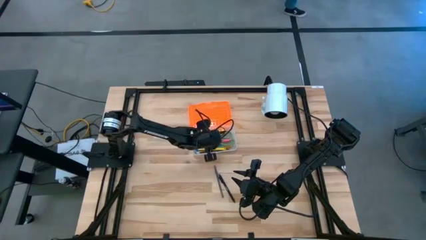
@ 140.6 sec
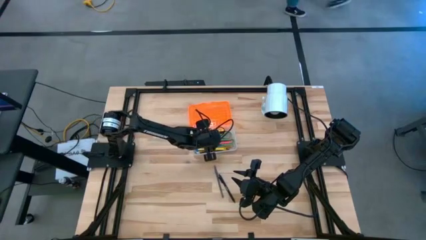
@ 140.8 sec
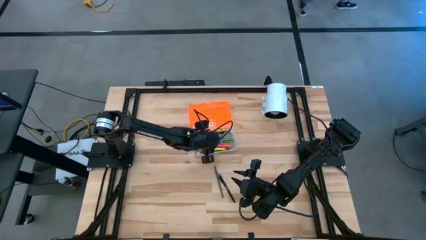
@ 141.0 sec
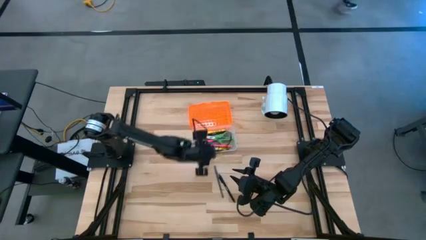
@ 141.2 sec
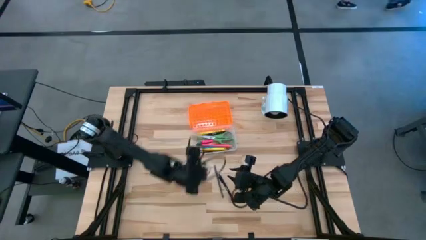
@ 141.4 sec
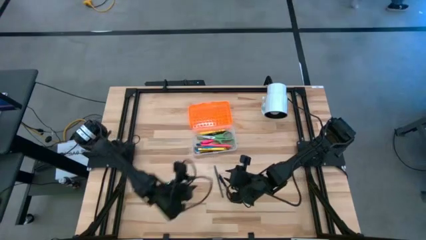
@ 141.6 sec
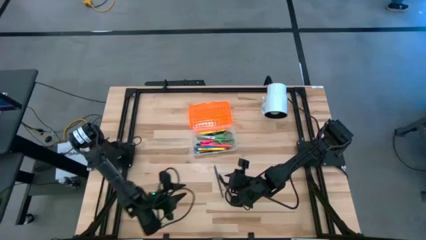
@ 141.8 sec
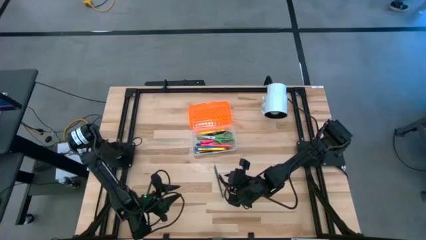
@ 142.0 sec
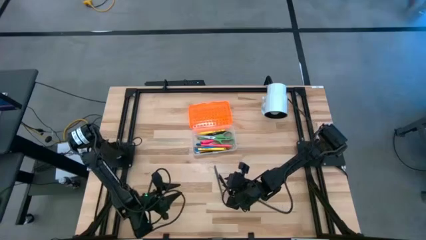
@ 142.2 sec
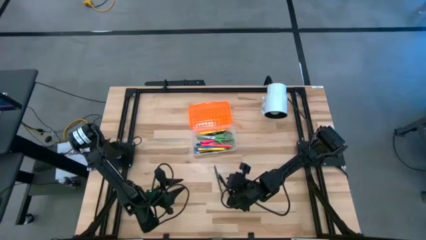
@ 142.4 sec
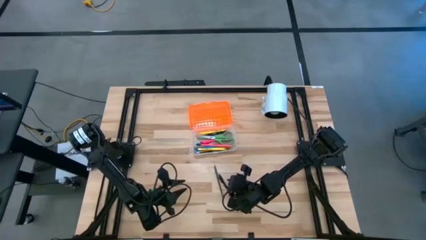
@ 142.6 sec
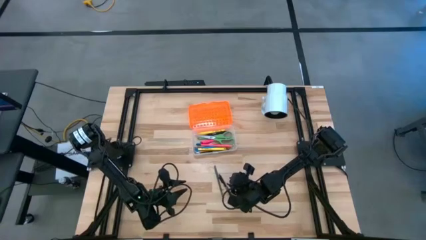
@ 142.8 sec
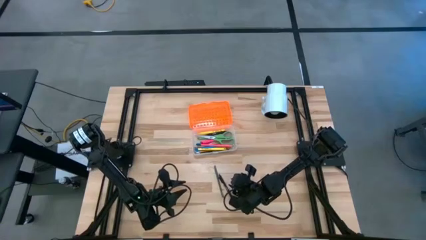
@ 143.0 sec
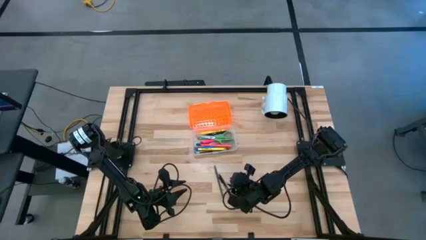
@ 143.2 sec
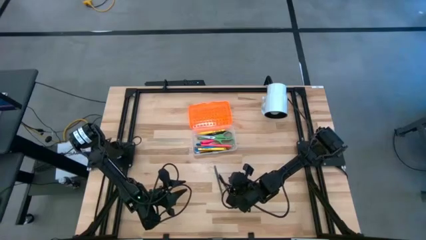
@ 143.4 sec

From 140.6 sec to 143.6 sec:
Task: Pick & place school supplies into a supply box
Put the black pen into the supply box

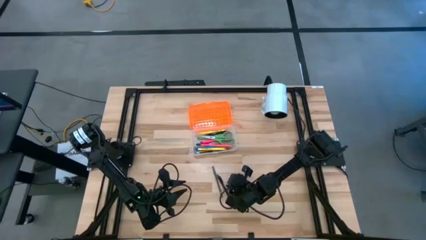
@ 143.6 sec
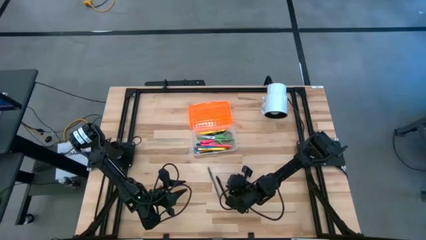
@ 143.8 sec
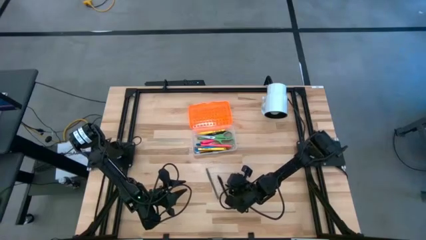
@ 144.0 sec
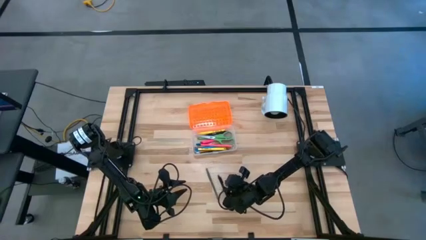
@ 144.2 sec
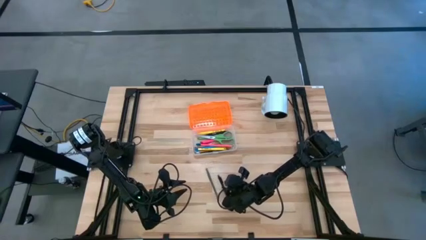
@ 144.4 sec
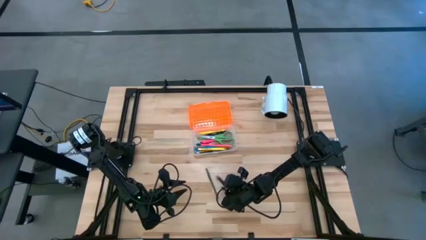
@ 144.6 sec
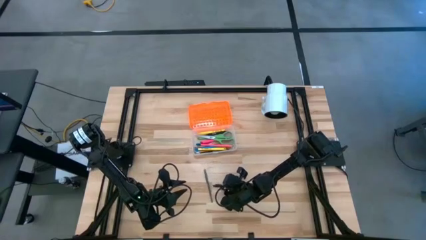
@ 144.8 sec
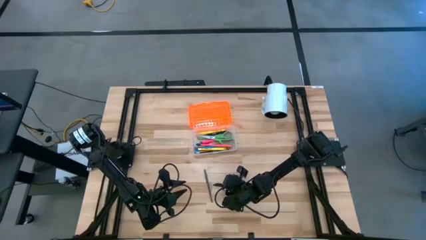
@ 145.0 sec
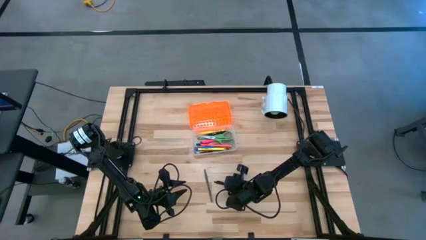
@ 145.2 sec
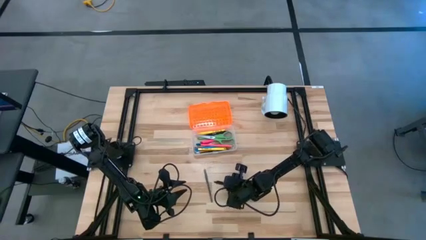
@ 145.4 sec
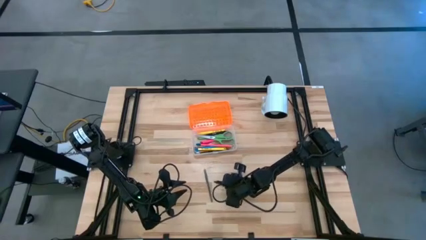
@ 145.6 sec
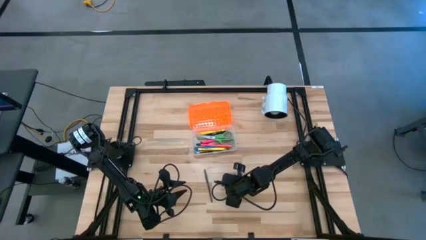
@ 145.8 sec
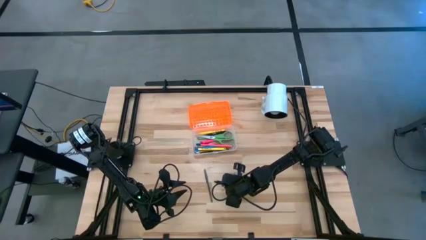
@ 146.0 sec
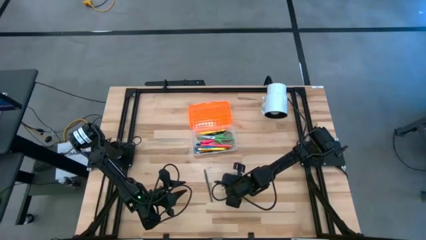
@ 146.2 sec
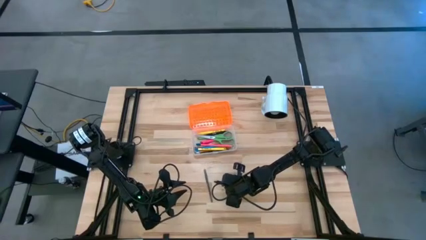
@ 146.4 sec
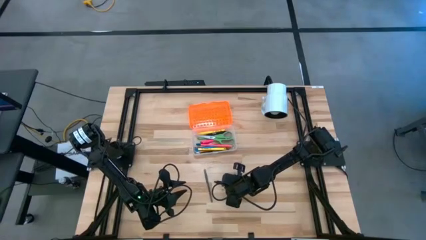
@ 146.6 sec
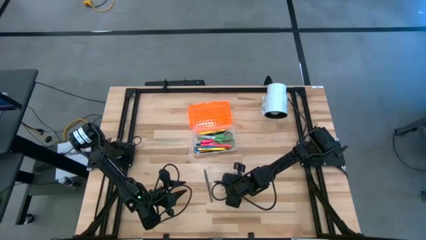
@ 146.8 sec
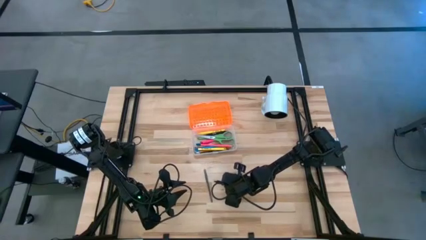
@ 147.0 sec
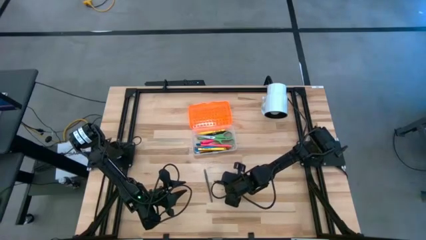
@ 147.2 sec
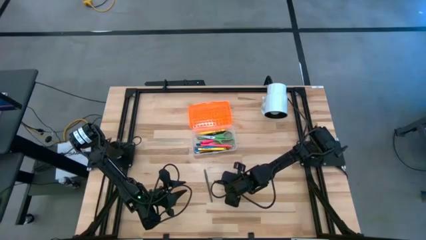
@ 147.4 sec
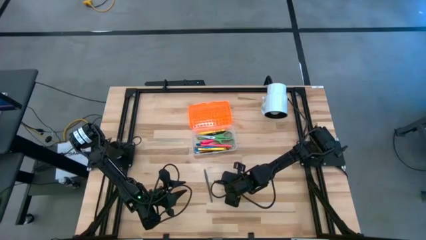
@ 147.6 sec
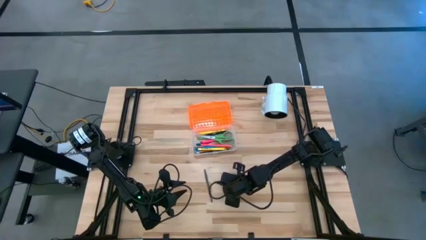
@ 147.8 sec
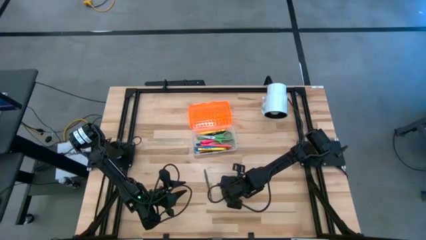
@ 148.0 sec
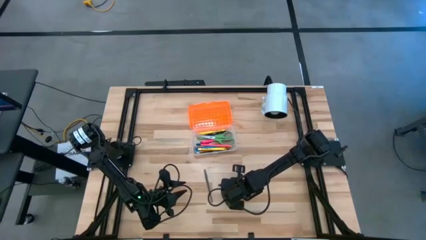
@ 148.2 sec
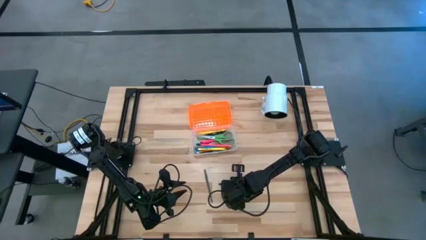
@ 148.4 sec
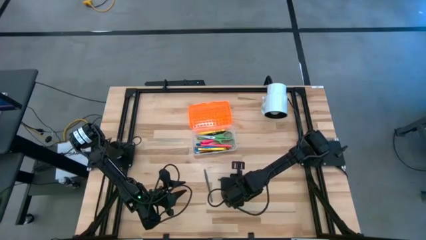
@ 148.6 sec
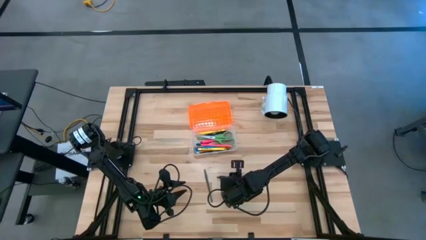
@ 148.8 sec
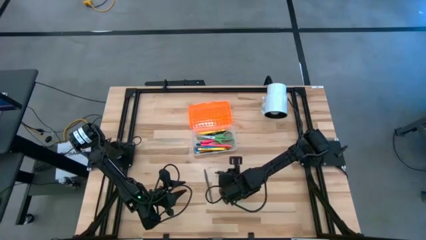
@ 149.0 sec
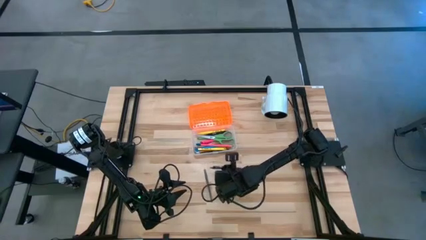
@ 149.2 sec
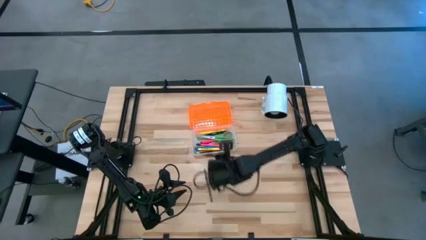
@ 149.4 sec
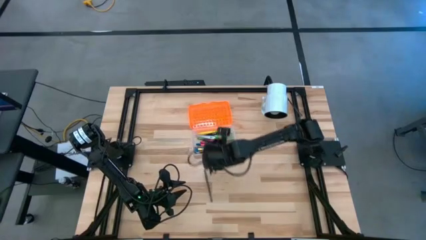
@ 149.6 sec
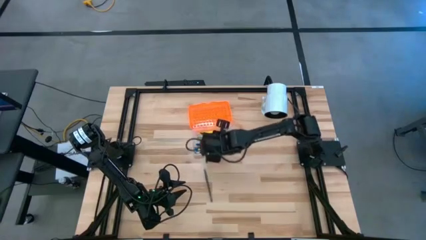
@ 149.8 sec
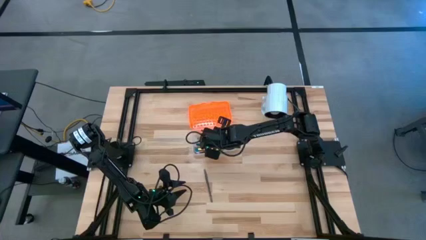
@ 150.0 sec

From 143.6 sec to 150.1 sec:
Put the black pen into the supply box

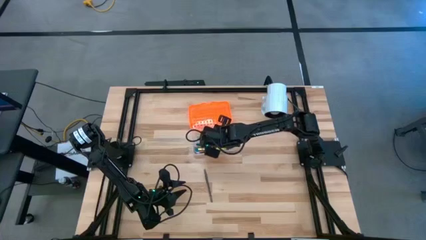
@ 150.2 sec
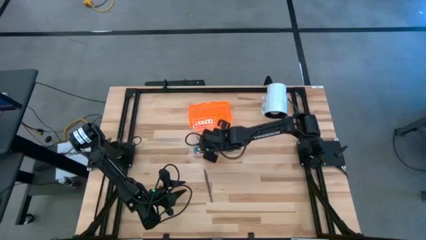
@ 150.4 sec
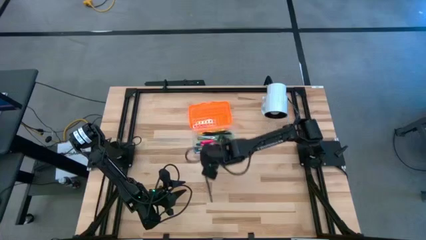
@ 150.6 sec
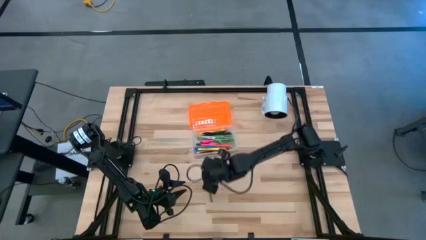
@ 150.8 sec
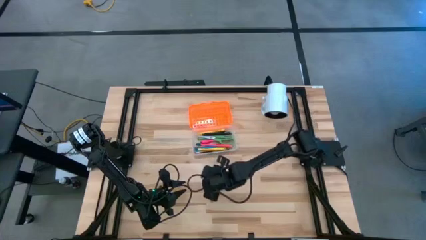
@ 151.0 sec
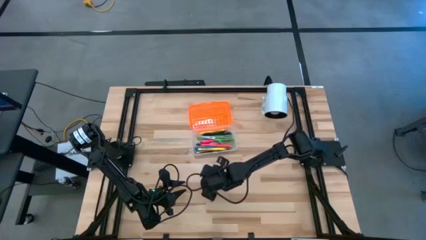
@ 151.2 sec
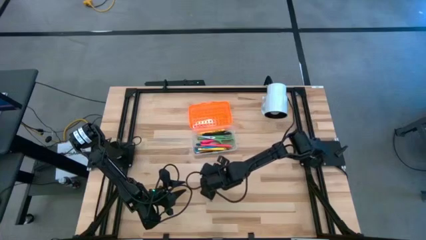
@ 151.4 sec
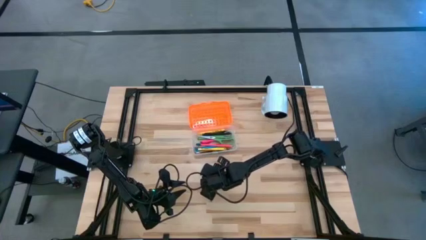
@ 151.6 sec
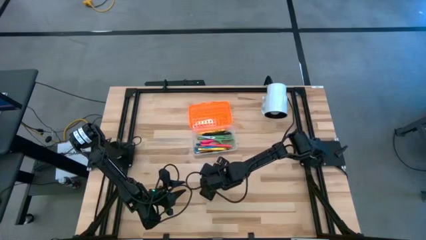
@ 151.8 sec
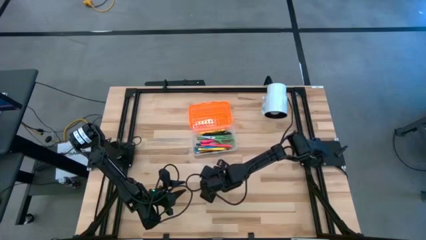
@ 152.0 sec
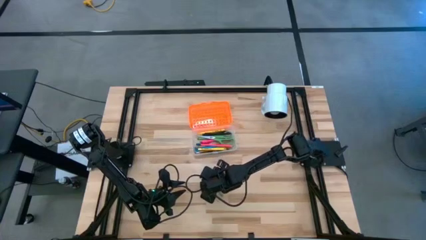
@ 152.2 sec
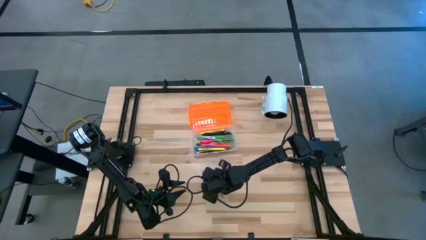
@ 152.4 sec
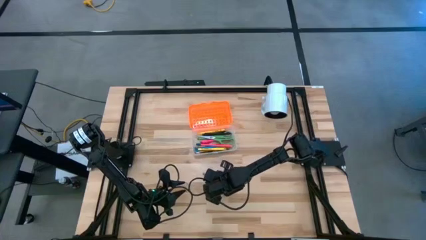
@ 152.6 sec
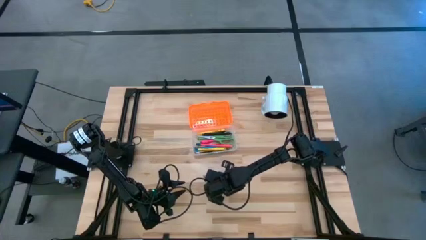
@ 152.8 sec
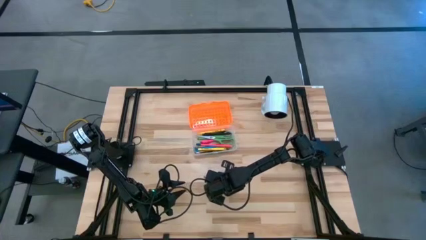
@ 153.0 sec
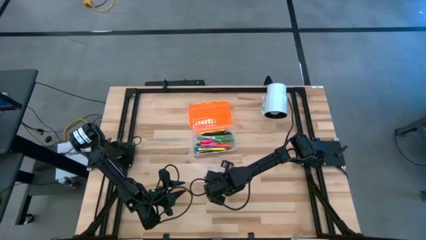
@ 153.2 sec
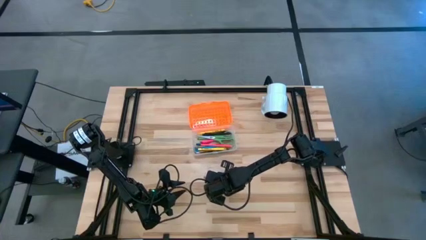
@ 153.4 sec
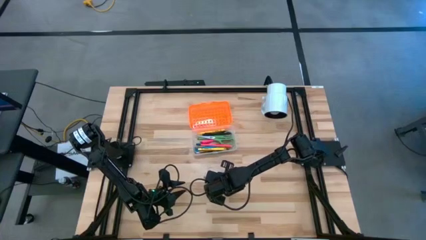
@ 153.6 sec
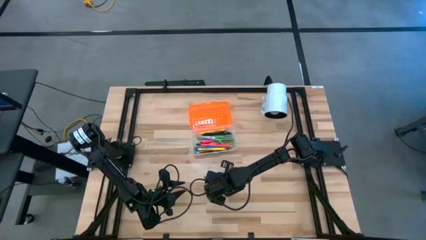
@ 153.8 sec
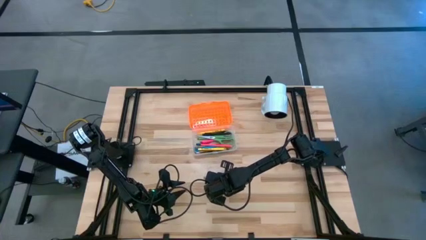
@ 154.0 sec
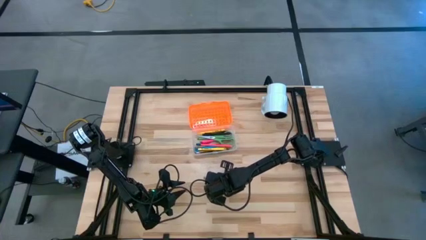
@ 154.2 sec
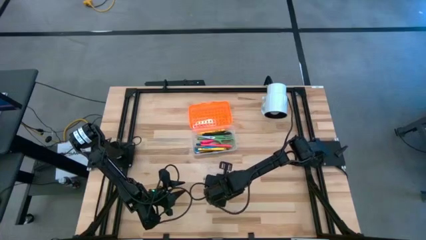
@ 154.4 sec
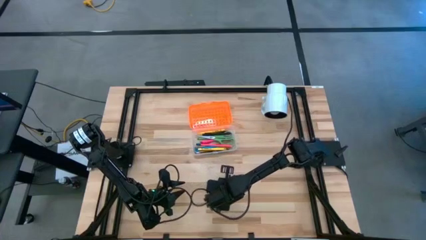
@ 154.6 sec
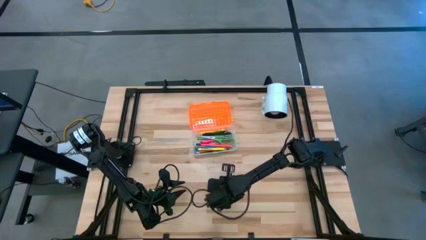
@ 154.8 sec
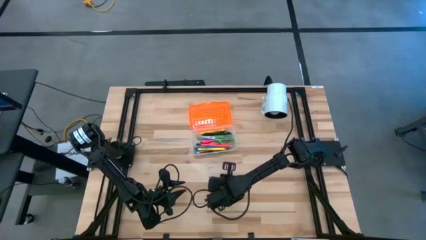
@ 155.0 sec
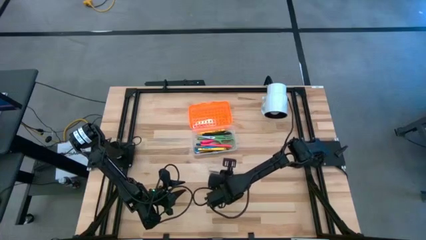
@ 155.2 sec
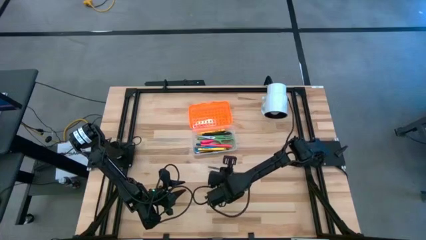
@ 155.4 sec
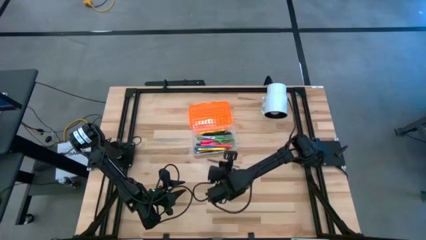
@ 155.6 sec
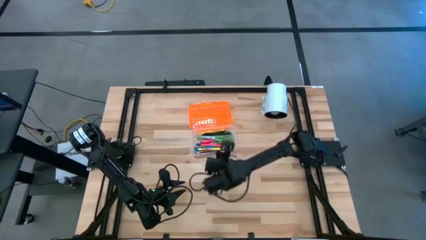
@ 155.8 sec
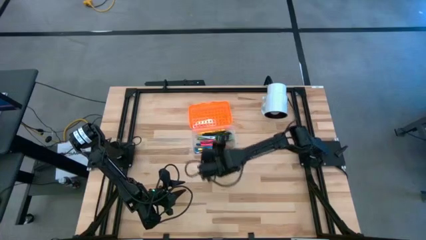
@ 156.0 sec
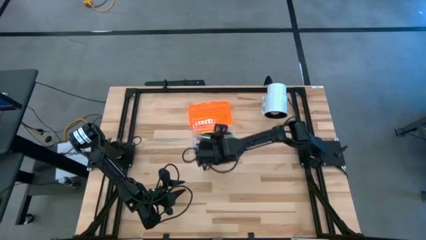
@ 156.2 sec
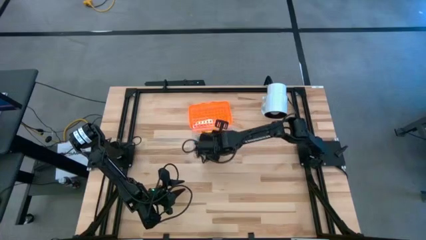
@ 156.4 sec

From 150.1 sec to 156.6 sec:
Put the gray pen into the supply box

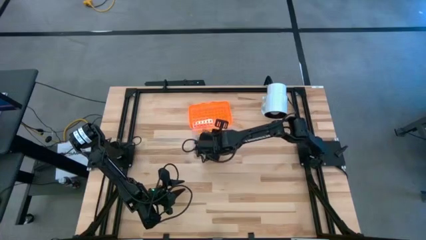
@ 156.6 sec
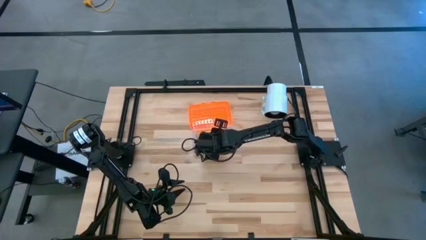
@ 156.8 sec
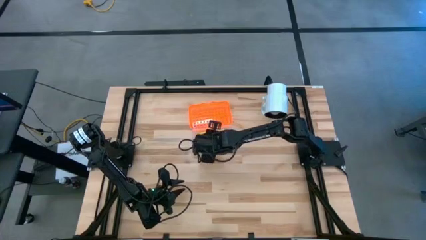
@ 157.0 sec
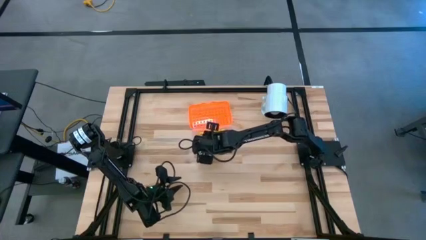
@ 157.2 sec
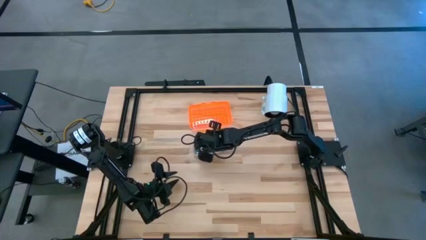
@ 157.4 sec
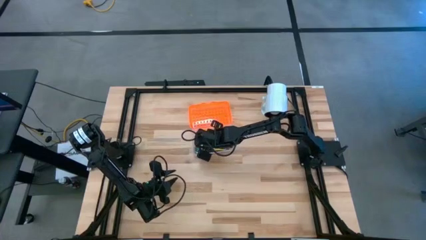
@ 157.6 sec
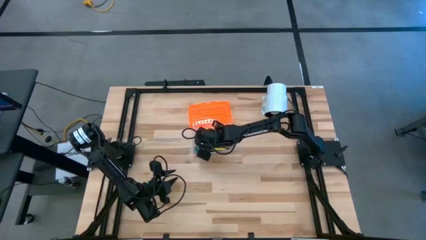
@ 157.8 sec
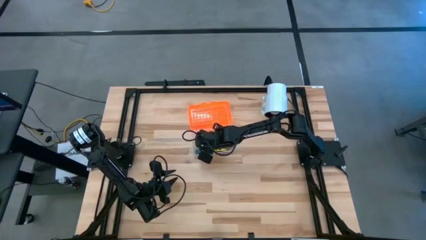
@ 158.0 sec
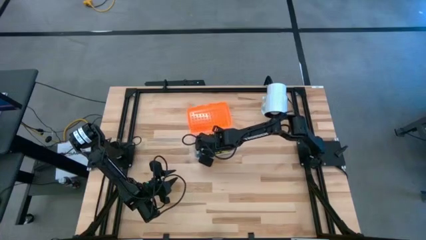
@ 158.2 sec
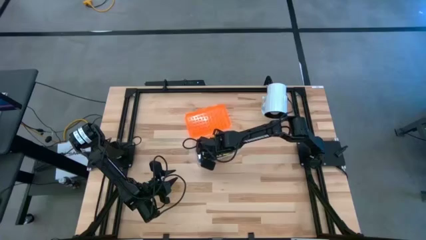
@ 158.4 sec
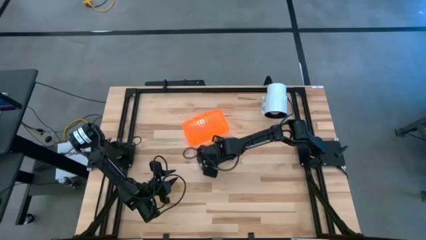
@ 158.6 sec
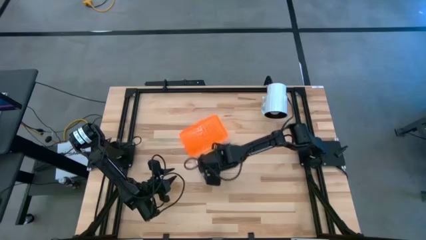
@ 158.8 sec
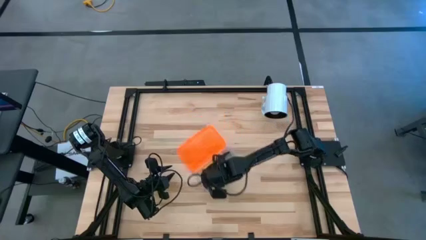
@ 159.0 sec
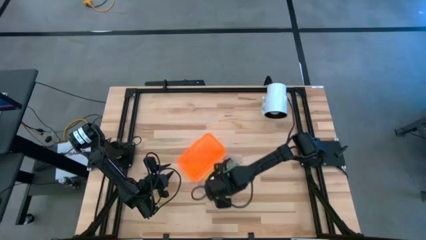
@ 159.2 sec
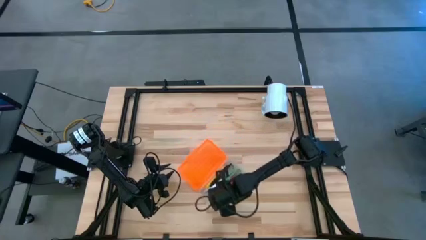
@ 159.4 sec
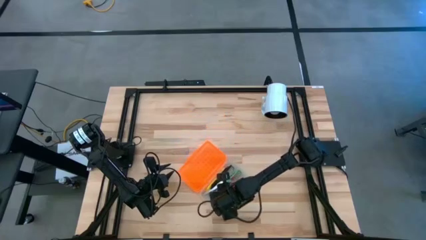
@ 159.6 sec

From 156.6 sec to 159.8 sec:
Adjust the supply box
